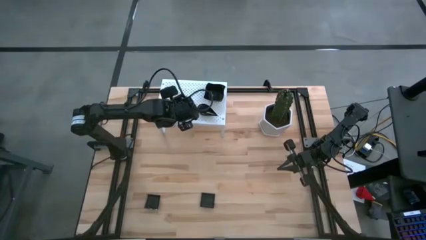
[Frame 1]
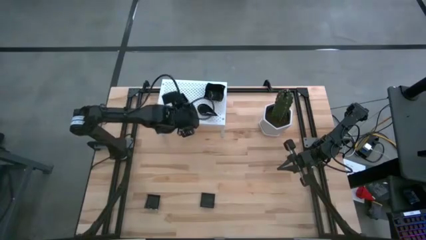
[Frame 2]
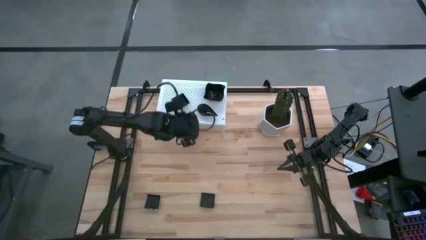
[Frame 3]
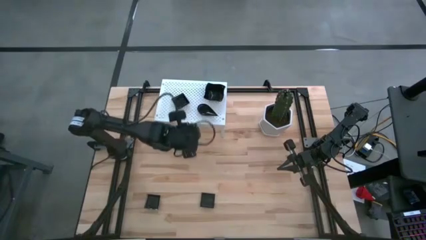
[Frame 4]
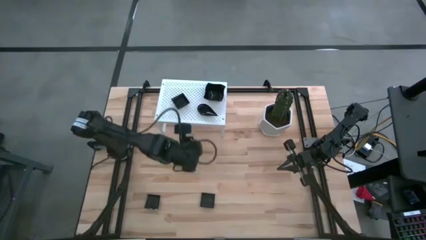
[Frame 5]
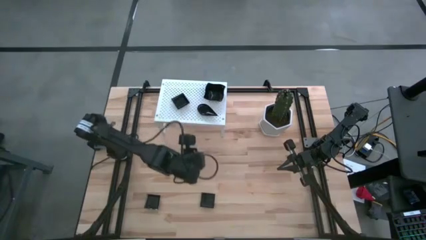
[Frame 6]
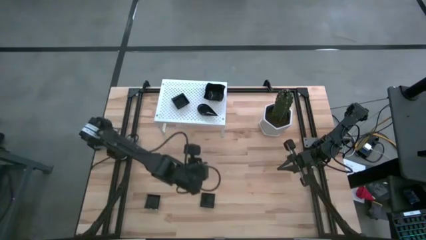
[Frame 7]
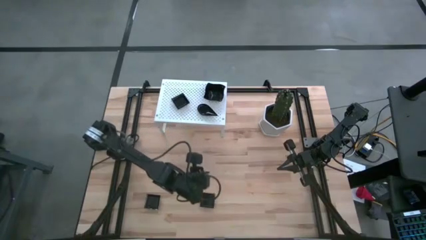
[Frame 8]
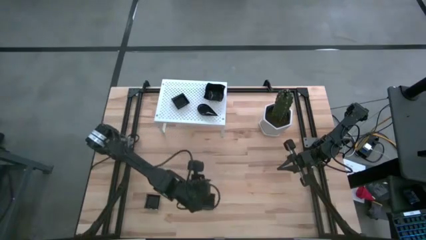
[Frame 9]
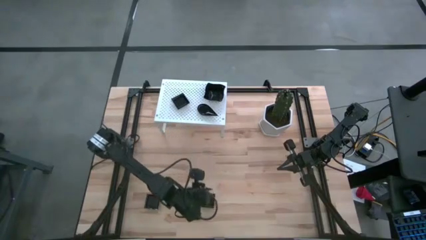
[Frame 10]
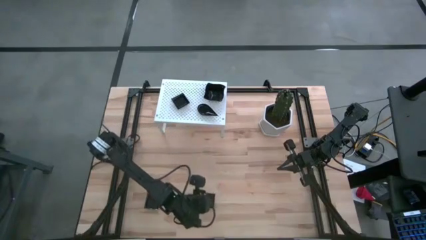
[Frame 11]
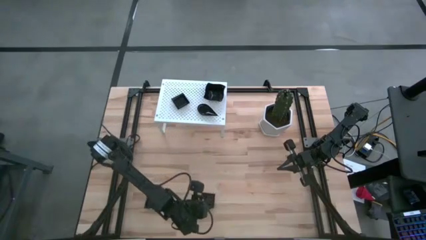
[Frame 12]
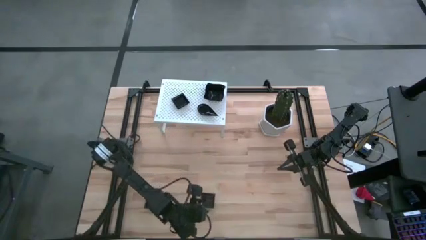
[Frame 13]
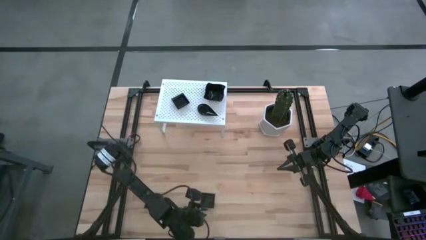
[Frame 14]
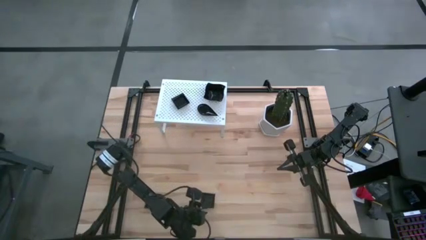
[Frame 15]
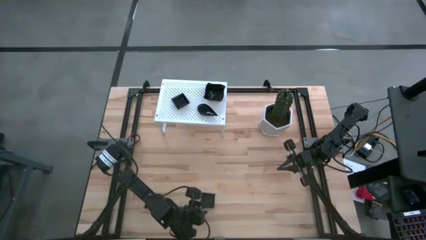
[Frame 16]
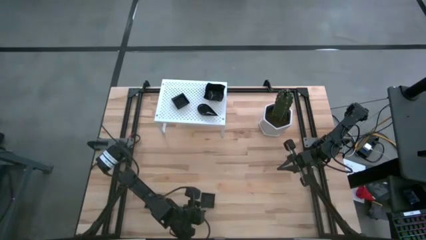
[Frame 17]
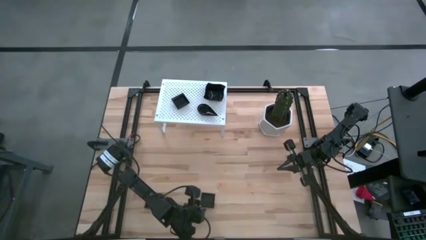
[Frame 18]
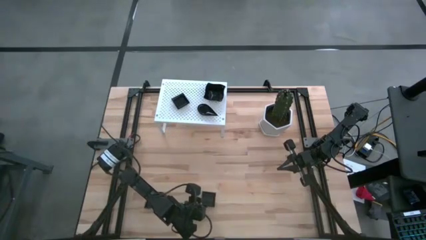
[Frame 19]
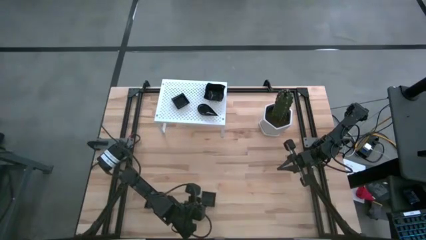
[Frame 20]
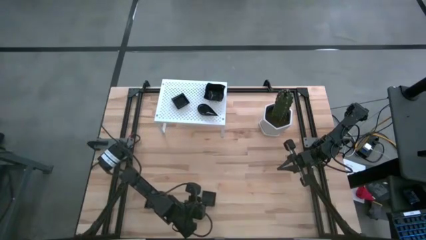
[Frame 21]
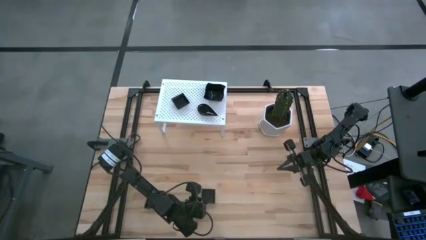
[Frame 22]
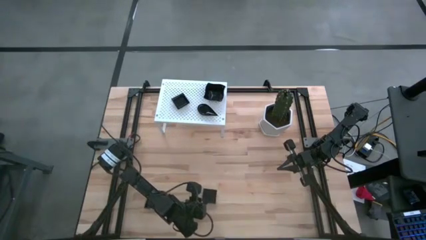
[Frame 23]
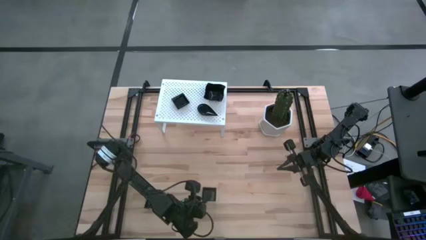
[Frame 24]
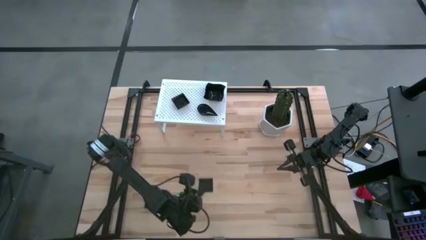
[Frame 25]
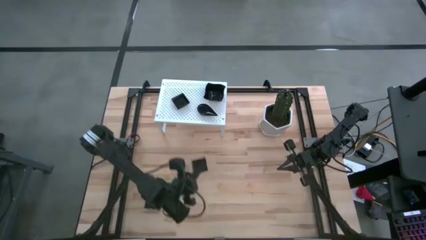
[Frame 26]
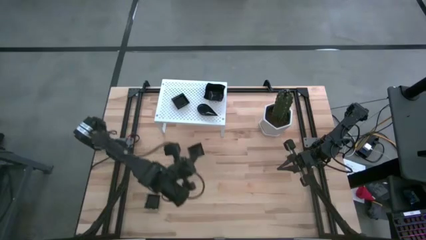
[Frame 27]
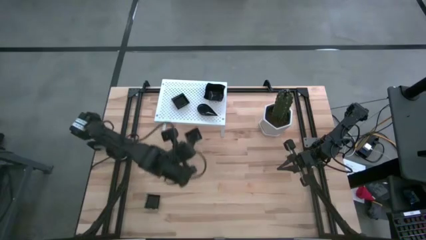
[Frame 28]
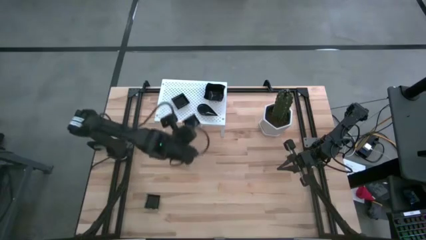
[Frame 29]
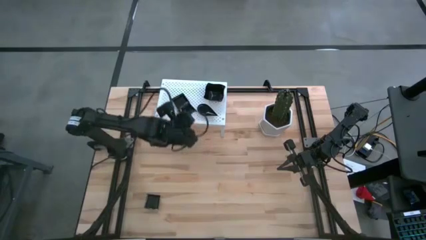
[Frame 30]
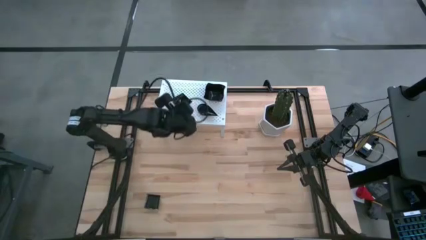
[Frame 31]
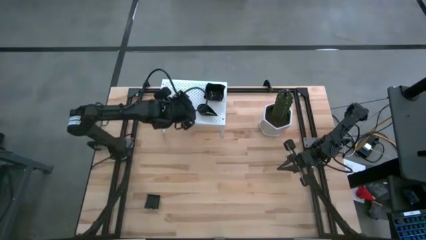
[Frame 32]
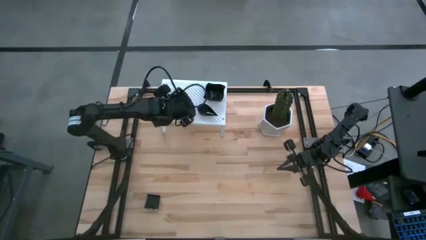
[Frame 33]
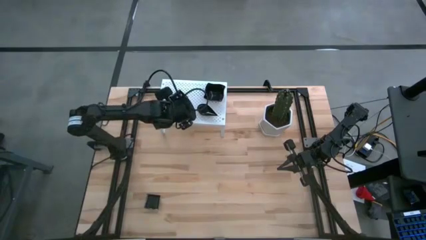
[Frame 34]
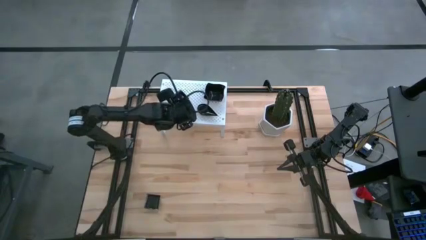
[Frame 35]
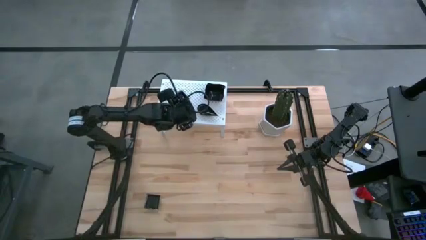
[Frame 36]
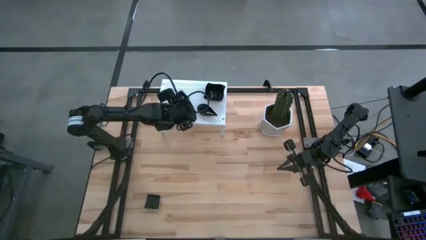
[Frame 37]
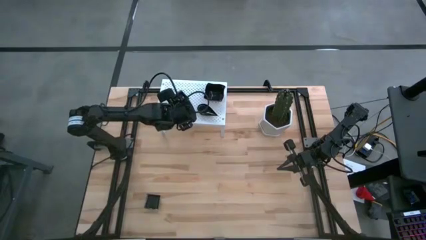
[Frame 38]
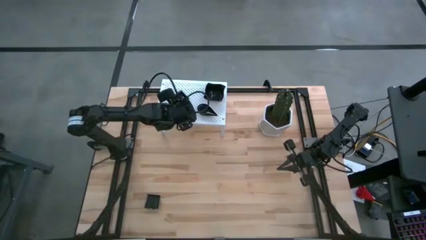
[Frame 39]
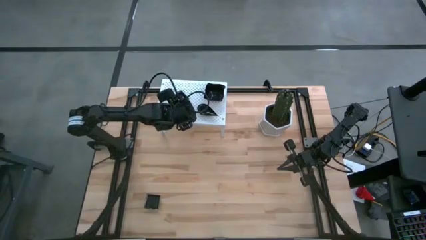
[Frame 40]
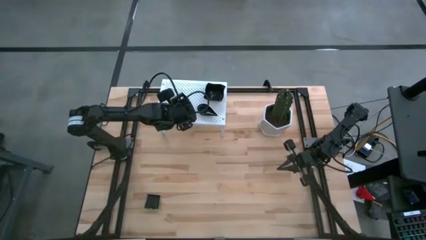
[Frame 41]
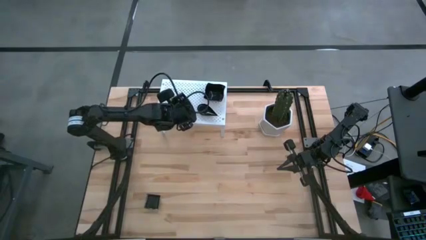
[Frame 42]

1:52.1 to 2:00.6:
Task: Pick & Place Mini shaped plates
Stack the square plate on top of the other square plates on the shelf

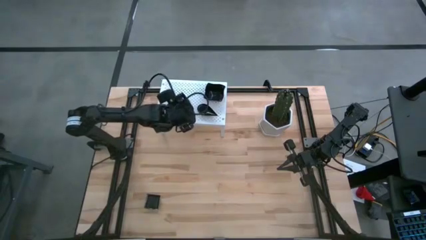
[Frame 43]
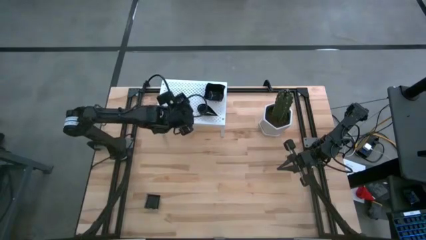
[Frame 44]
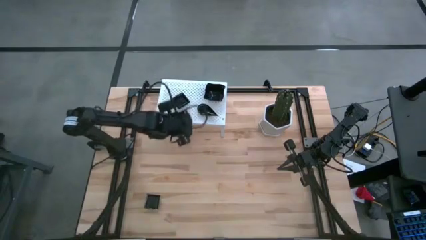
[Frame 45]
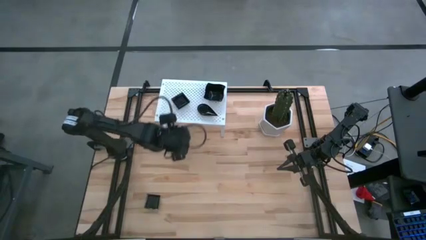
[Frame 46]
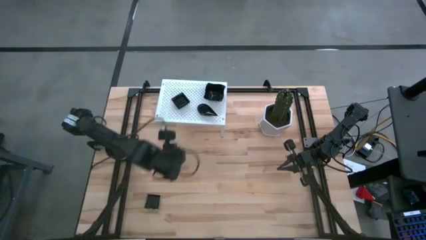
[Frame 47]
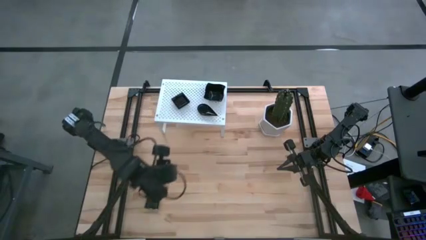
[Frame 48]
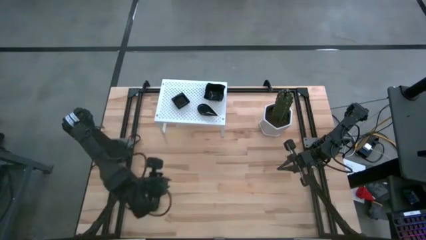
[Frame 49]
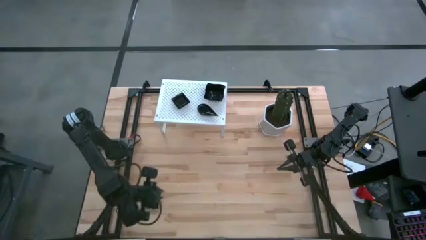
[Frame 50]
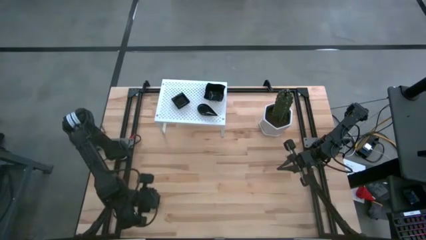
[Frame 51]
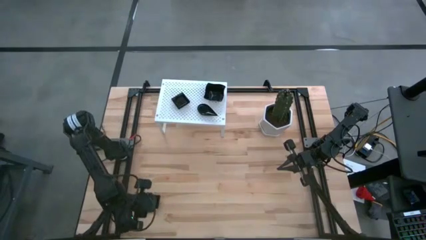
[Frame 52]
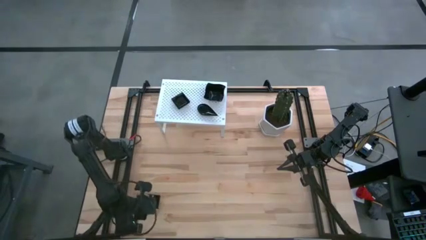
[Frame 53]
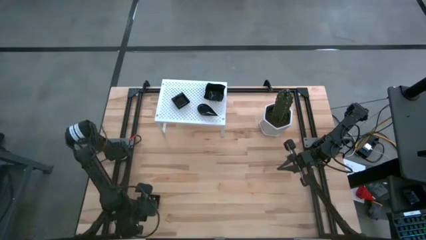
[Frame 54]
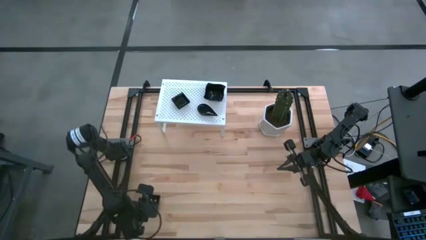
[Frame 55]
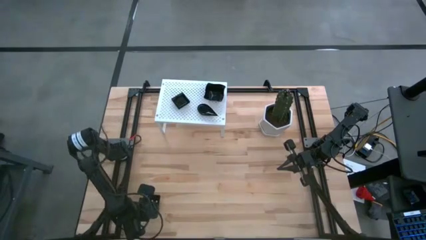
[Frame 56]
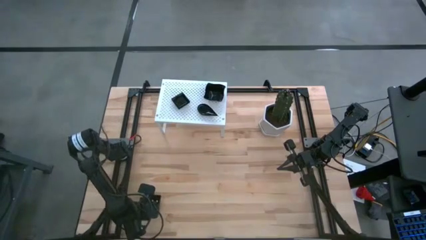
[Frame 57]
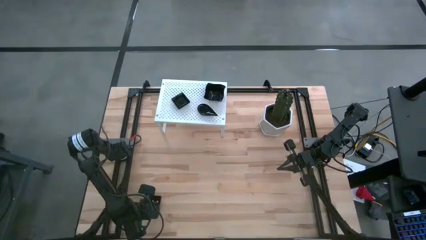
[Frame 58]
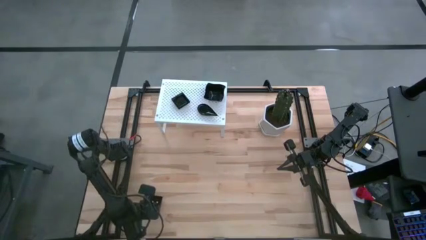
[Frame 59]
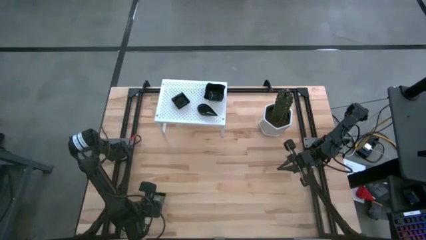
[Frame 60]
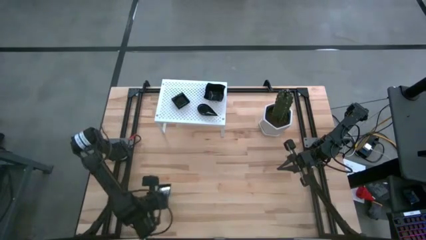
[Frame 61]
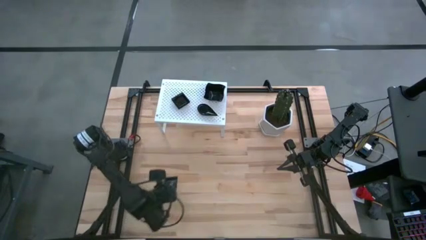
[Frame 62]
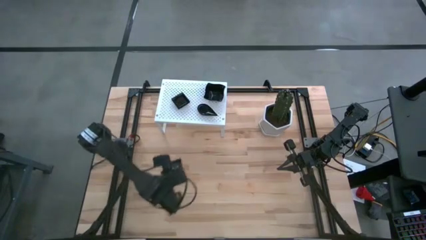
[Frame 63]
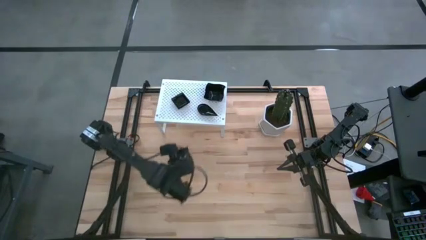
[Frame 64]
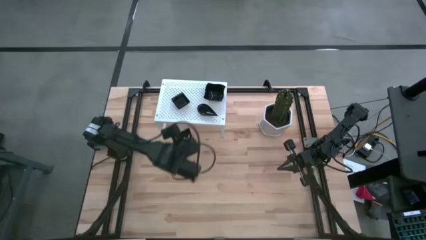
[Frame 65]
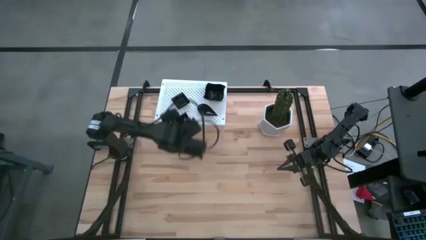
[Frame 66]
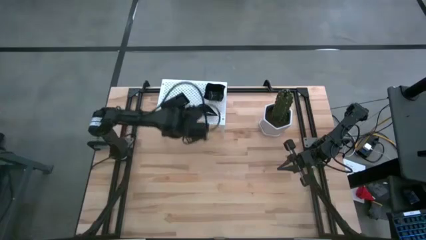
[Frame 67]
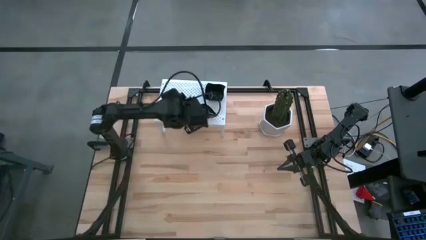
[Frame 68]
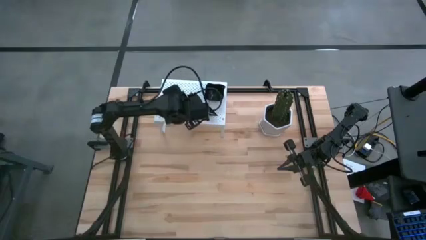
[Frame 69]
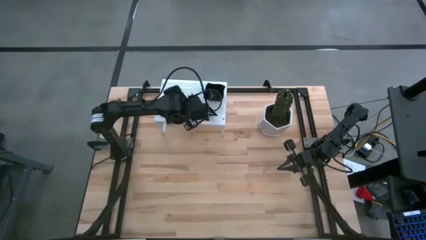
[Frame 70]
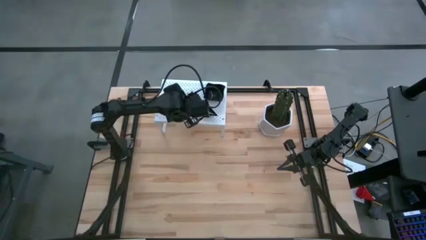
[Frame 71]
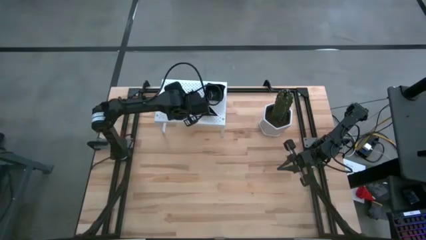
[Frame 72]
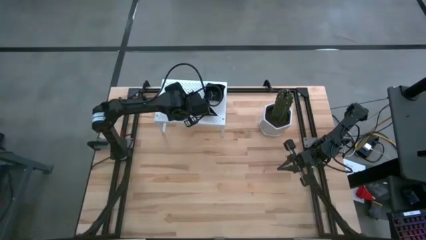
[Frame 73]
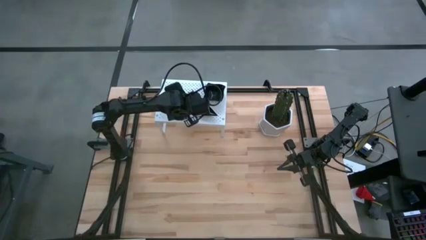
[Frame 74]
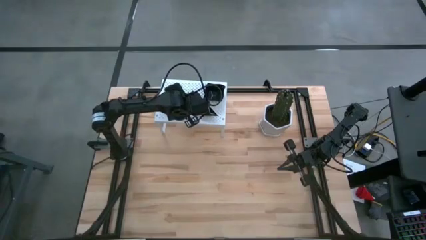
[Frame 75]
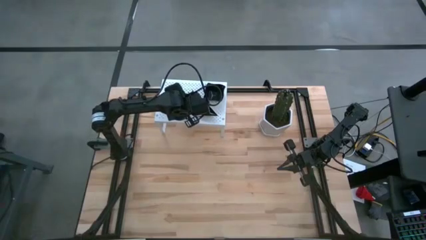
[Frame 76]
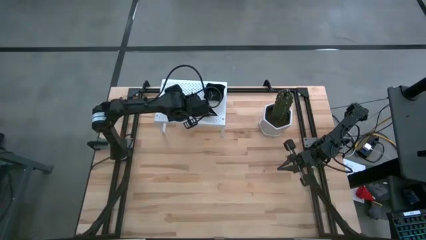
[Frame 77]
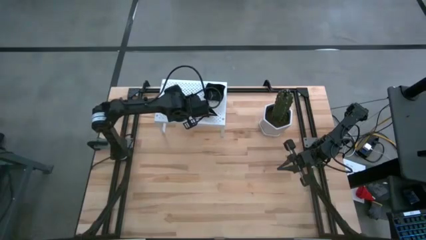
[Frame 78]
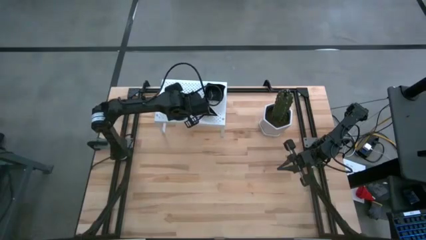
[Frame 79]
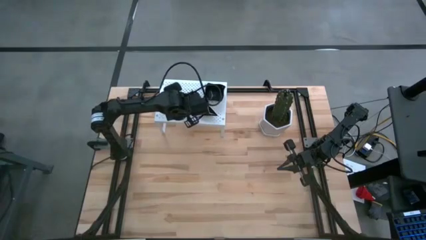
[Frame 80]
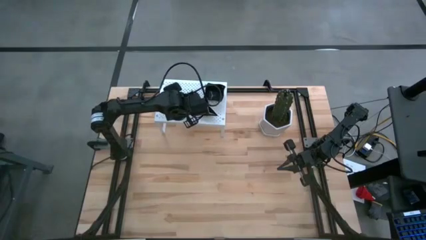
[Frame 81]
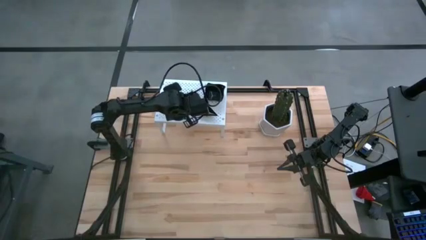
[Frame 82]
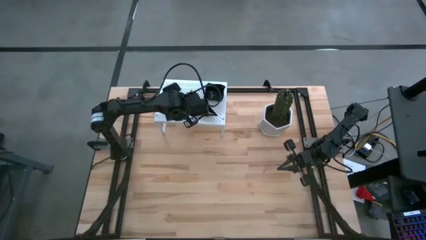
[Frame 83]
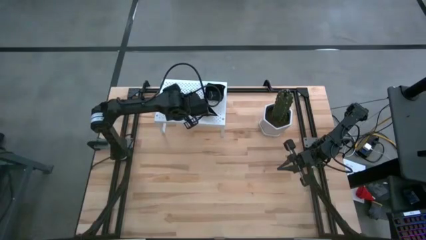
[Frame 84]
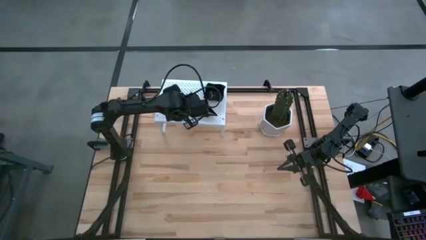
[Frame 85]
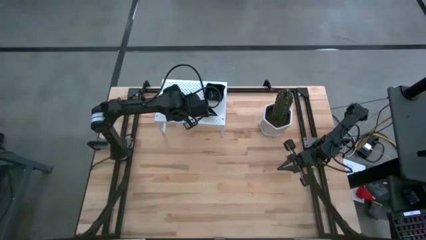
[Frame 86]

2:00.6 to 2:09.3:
Stack the square plate on top of the other square plates on the shelf
